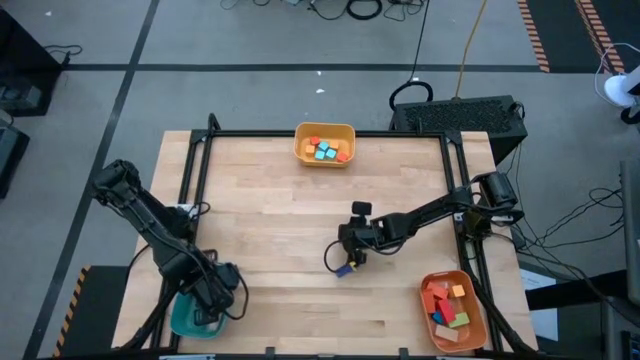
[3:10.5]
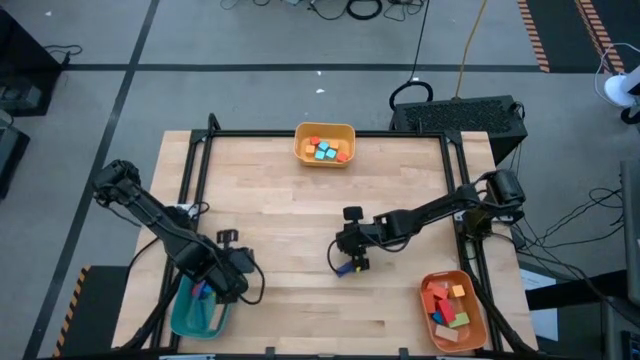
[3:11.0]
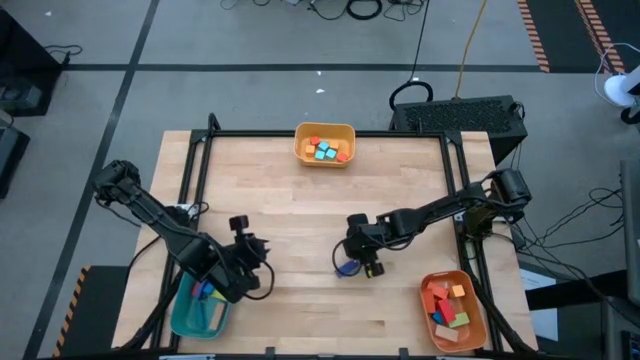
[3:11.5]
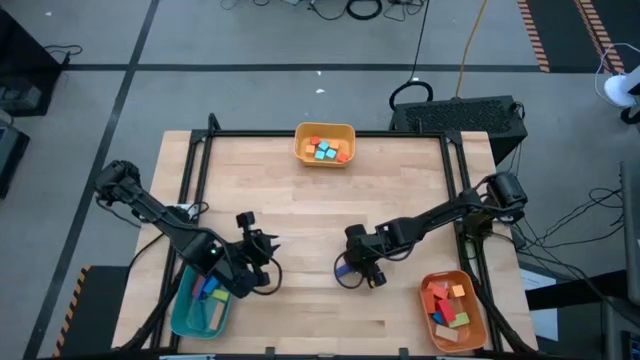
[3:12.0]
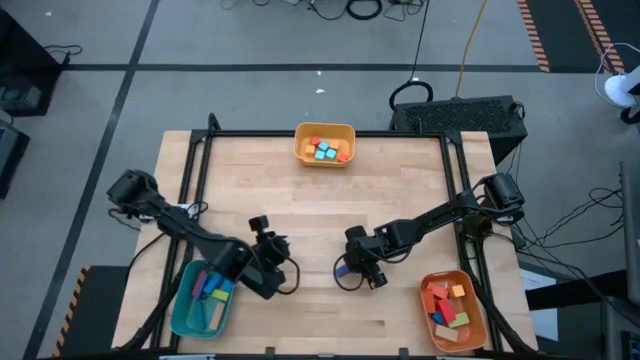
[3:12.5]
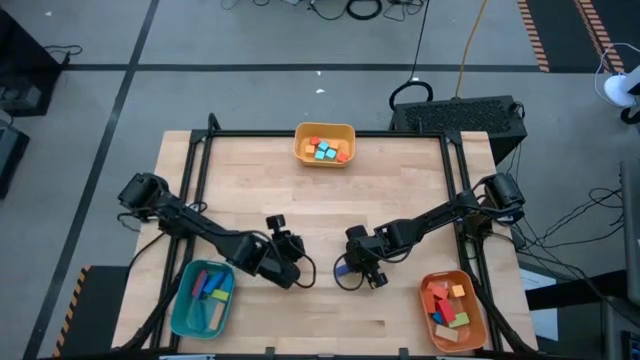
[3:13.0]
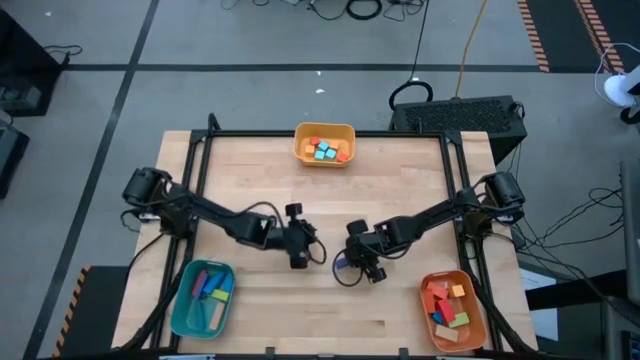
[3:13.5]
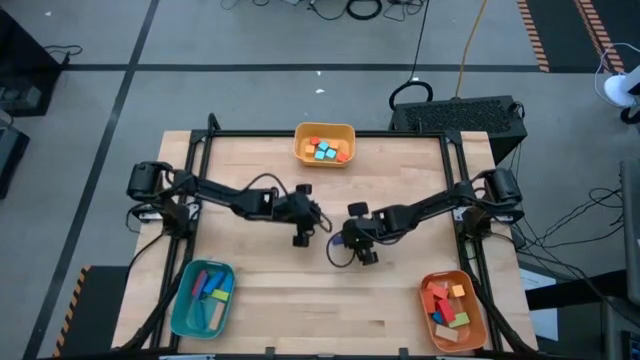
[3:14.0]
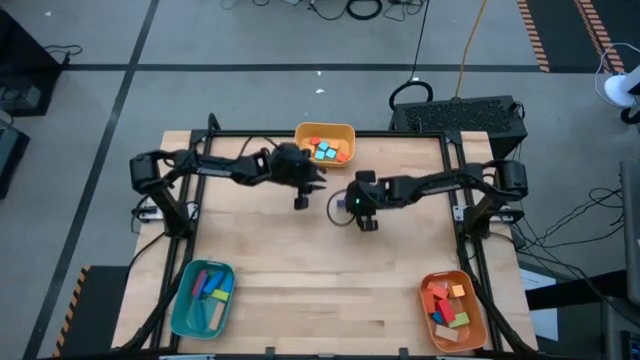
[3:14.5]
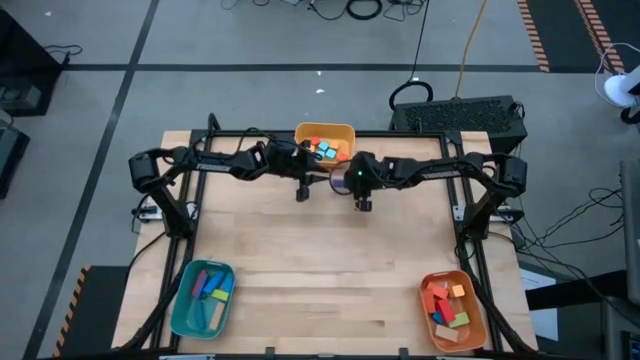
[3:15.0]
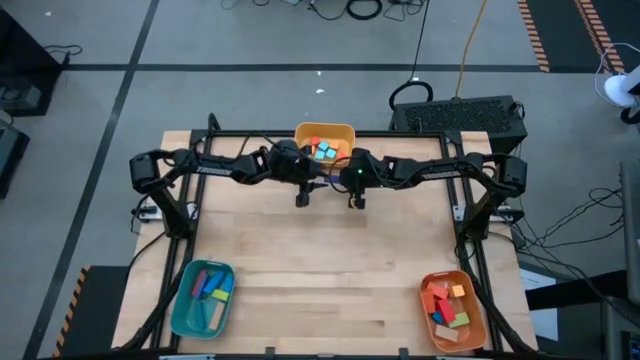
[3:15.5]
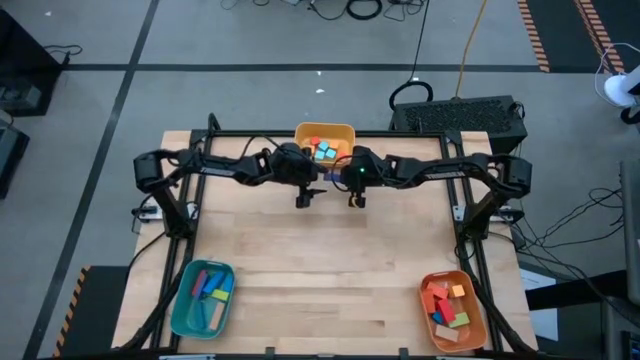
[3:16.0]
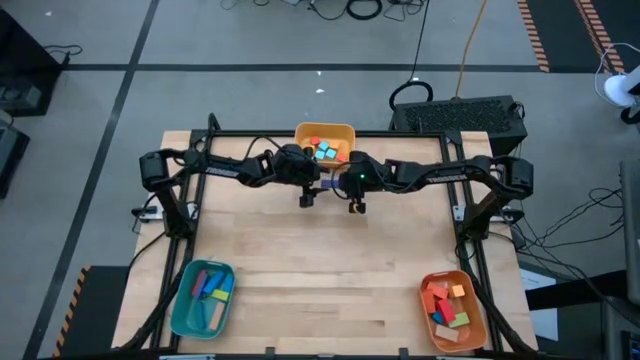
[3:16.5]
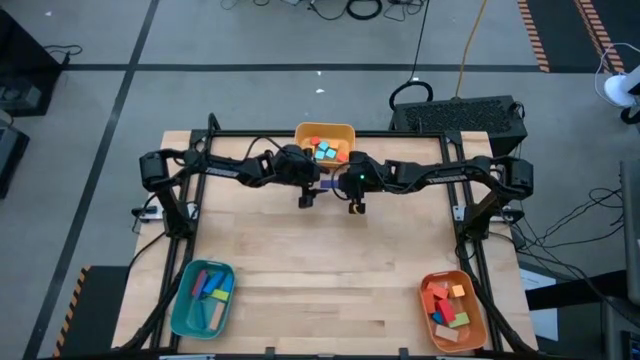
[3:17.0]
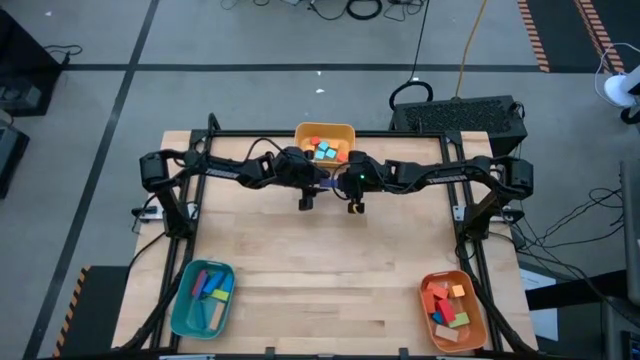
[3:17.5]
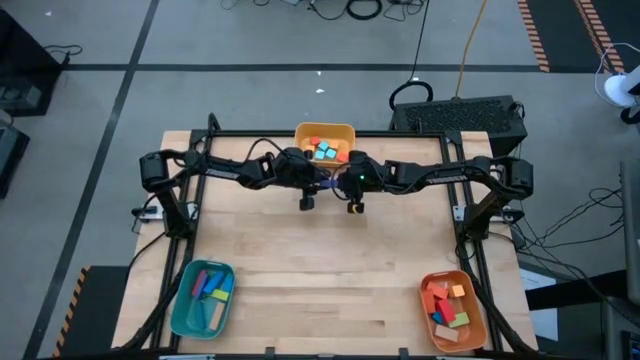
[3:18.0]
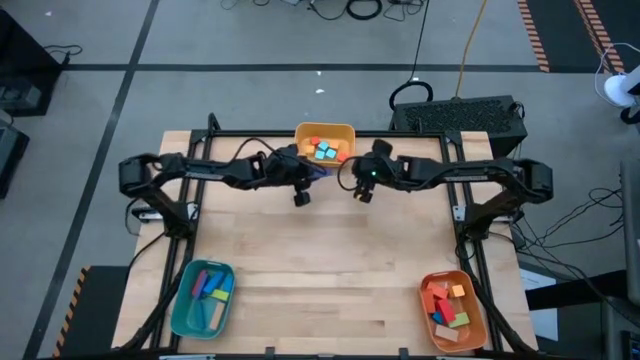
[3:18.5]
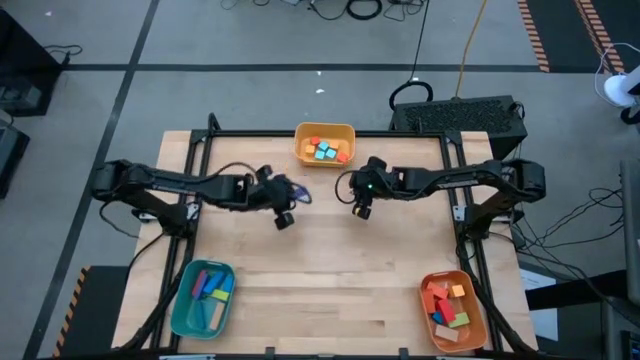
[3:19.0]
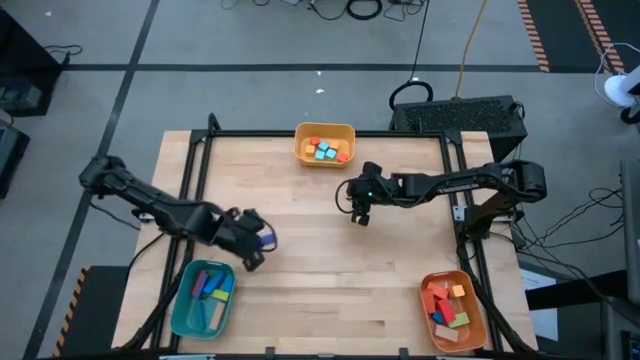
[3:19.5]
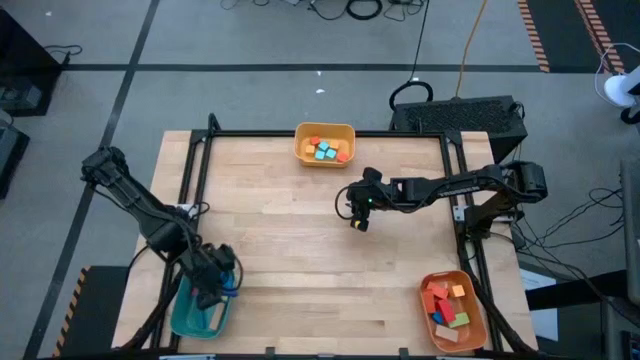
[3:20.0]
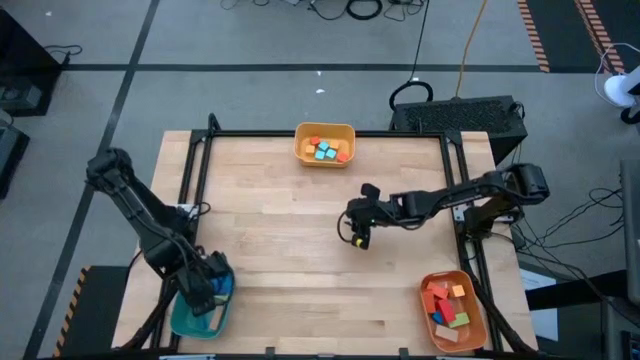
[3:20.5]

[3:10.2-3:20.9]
Task: Sort blocks by size
Put the small violet rectangle block into the green bin

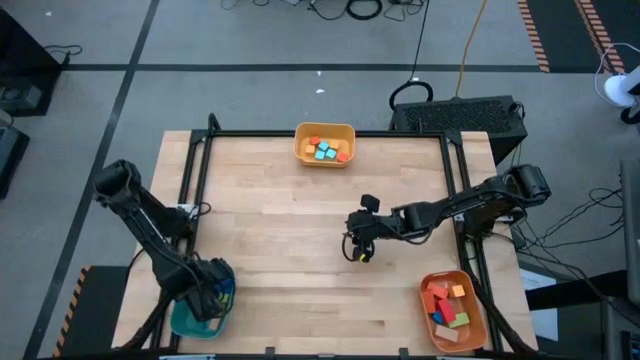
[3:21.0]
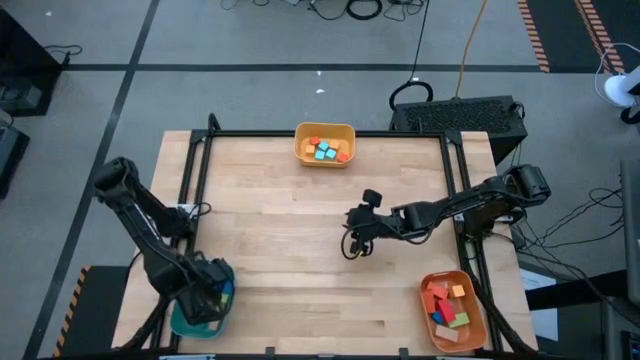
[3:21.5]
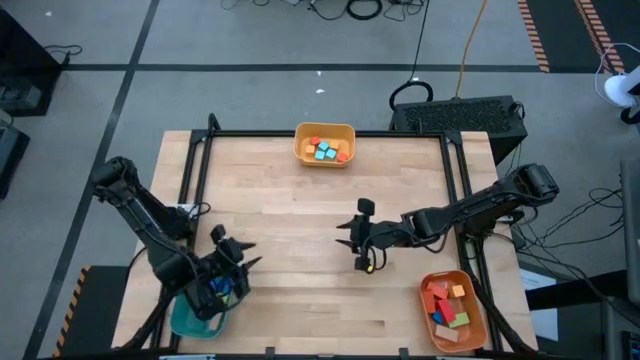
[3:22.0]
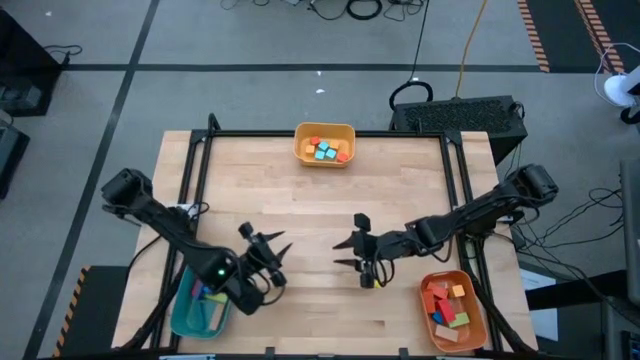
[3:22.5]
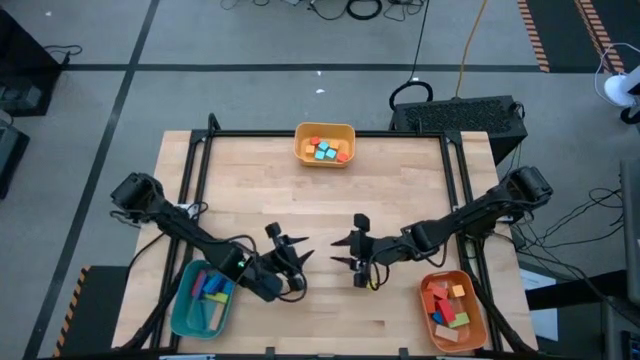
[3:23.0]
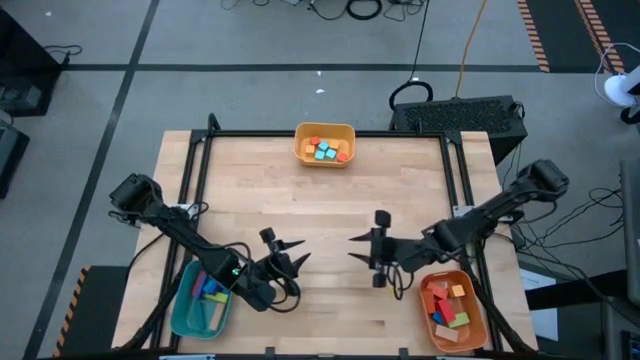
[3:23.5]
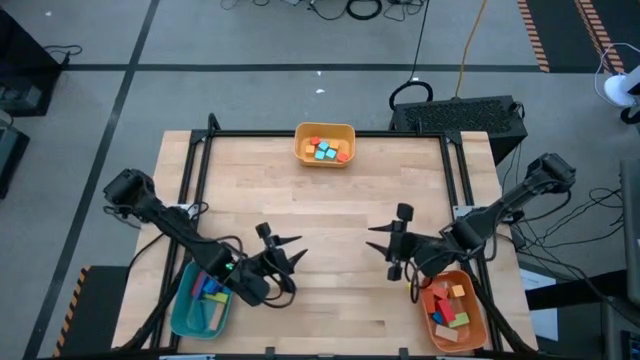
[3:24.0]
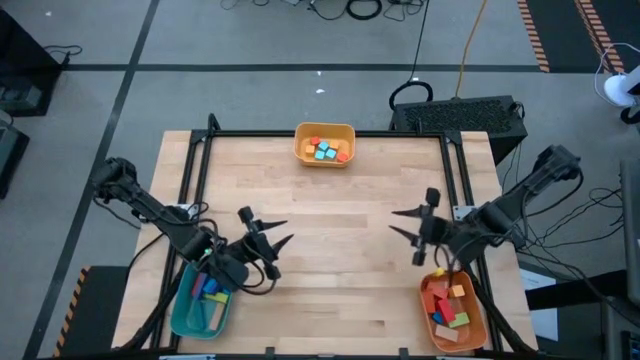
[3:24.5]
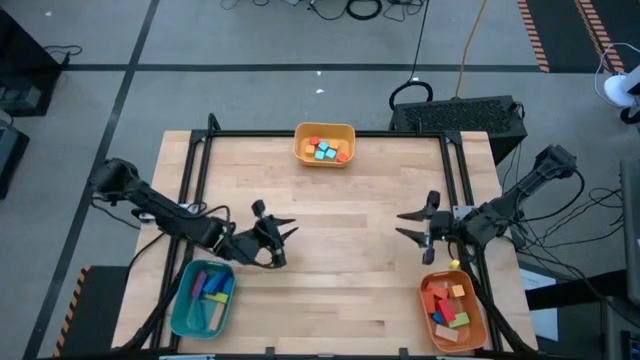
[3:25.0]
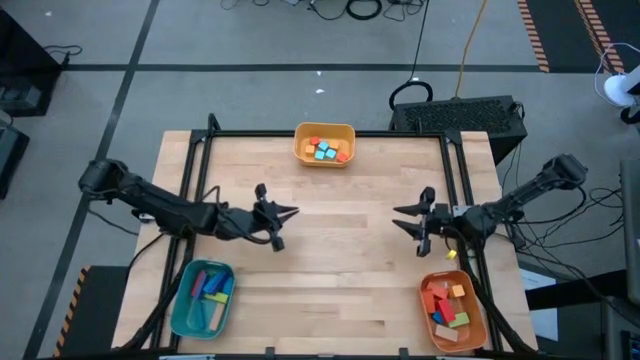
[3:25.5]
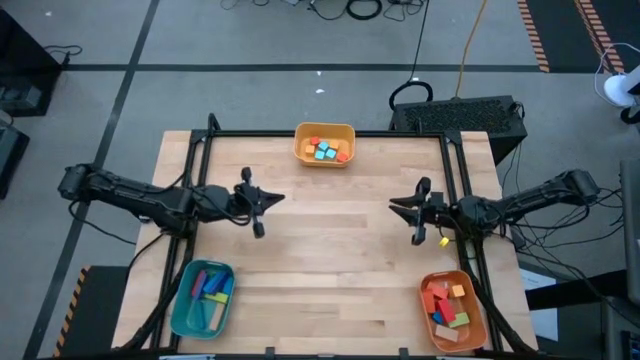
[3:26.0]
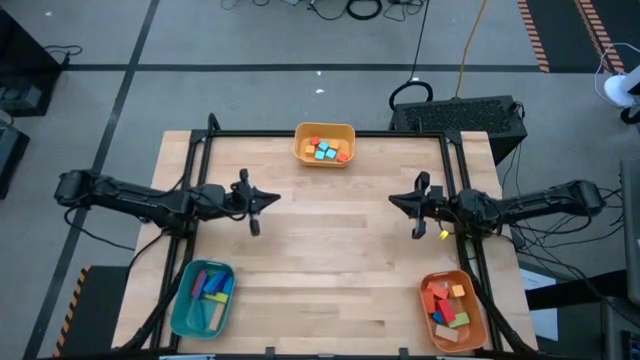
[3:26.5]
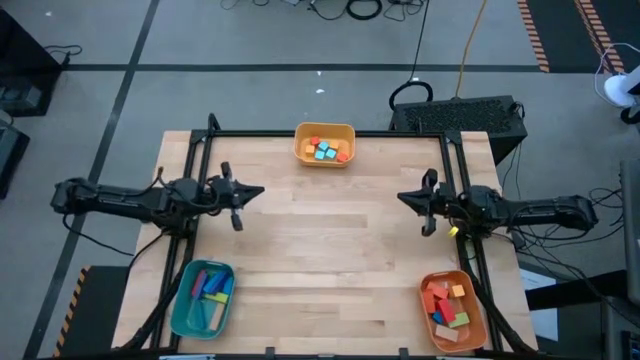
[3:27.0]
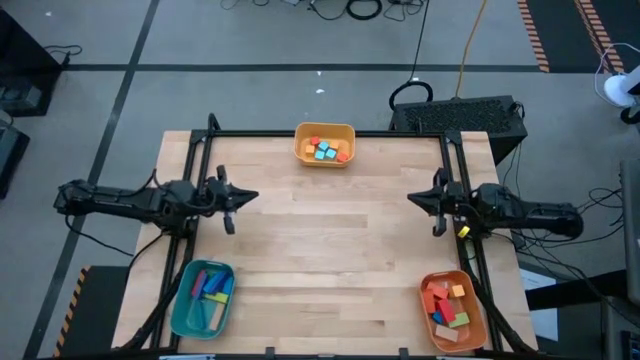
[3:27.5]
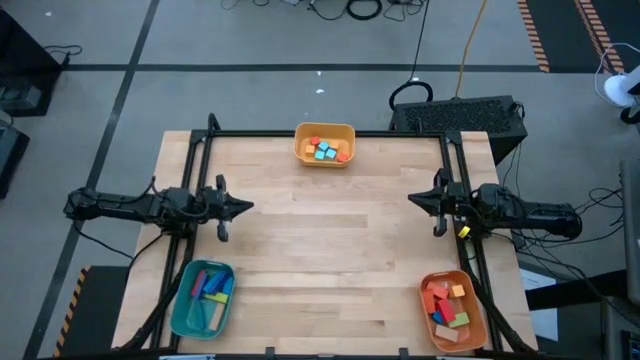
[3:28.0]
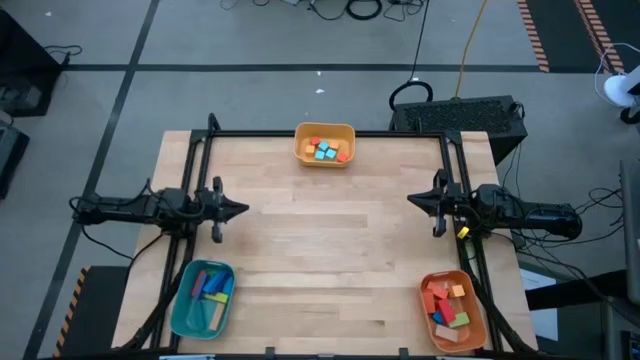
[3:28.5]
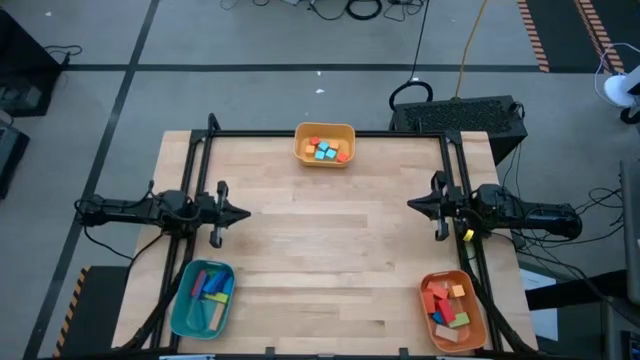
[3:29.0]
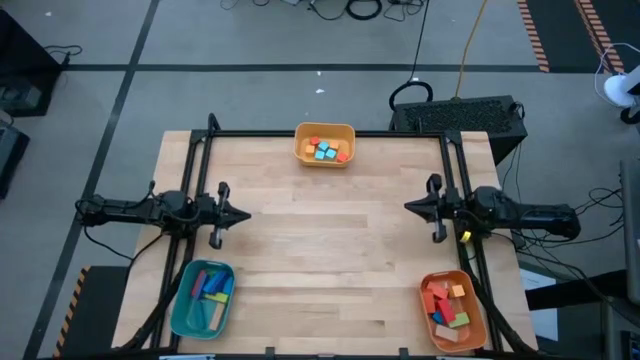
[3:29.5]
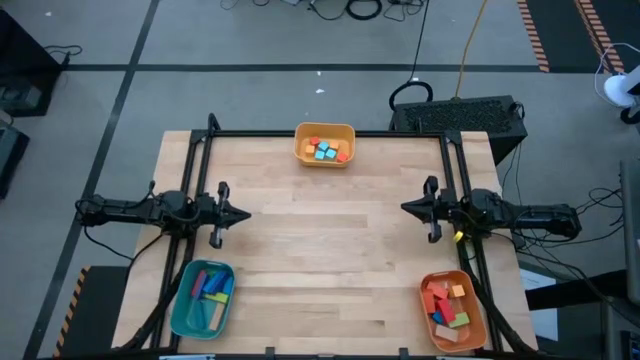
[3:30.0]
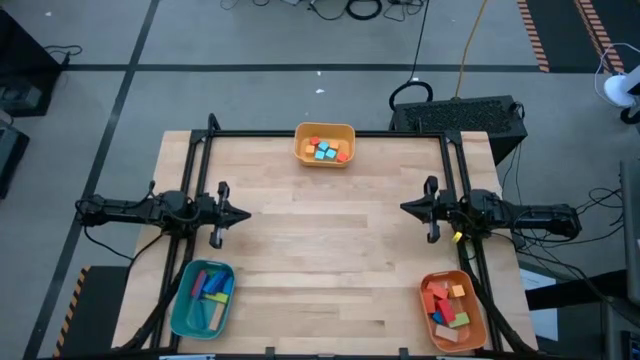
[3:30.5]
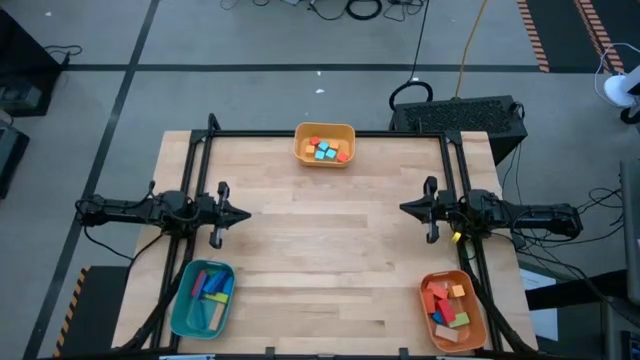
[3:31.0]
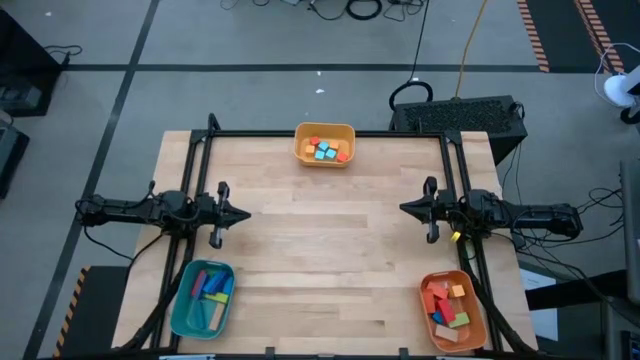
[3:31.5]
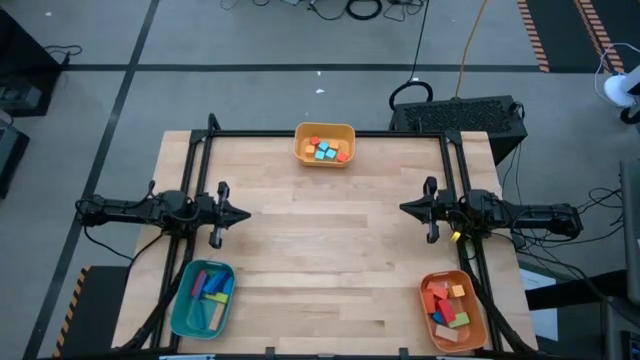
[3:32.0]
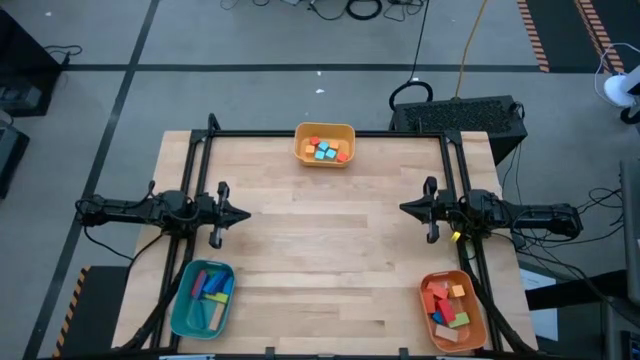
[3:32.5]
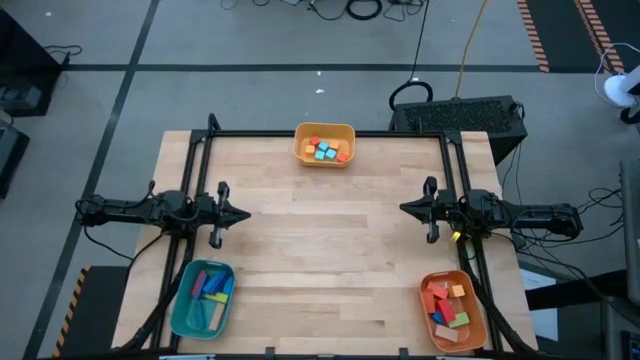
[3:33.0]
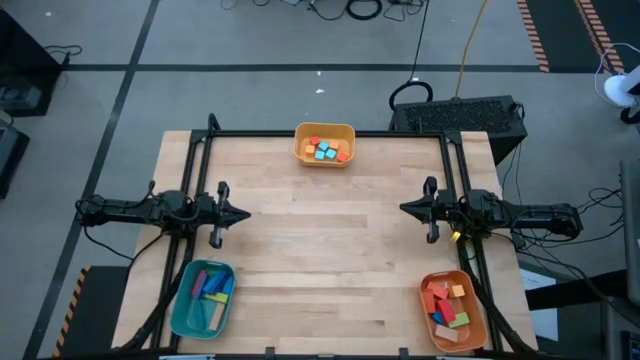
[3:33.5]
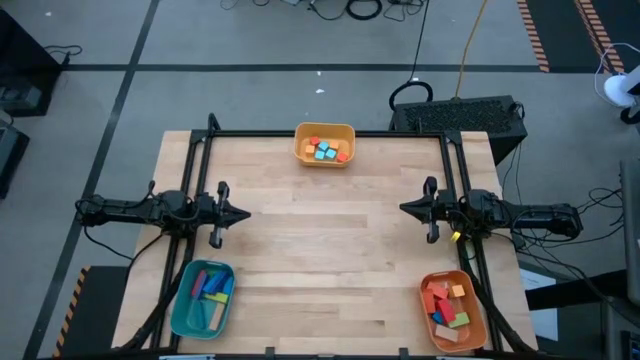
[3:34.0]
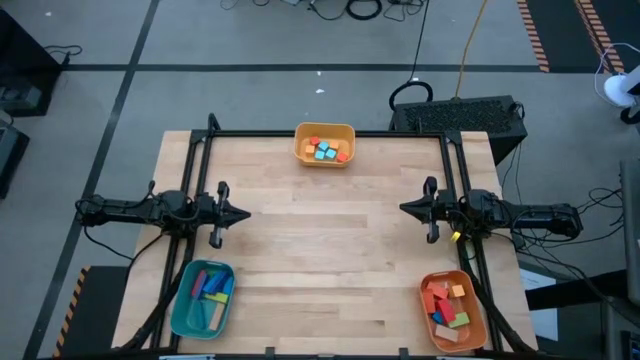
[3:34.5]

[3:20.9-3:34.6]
Return to Home Position
